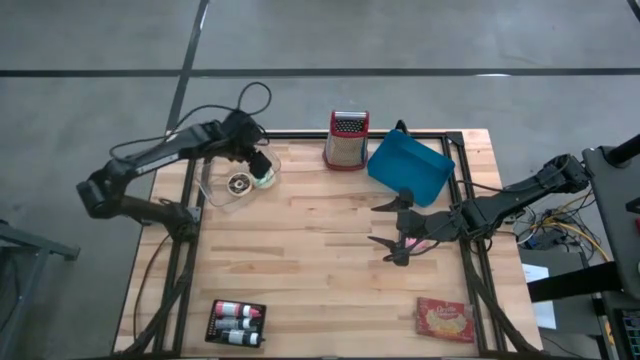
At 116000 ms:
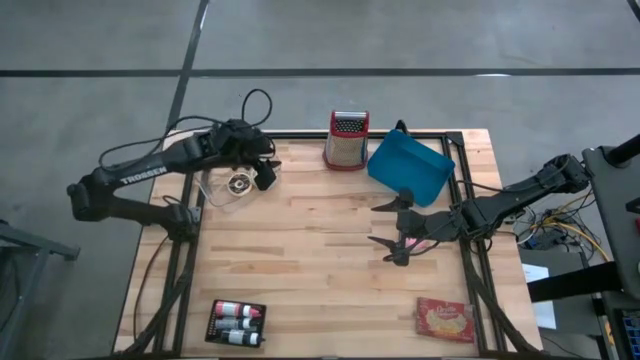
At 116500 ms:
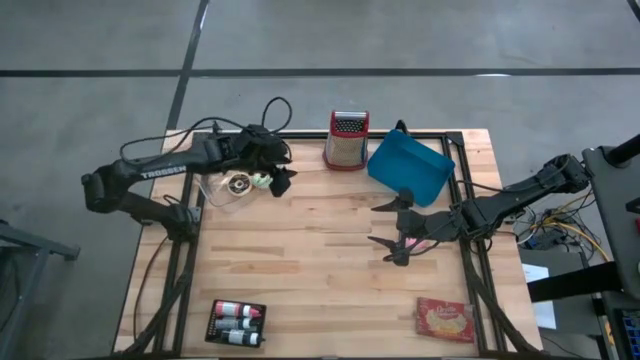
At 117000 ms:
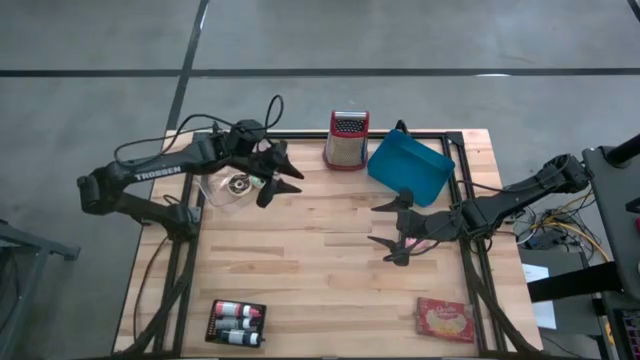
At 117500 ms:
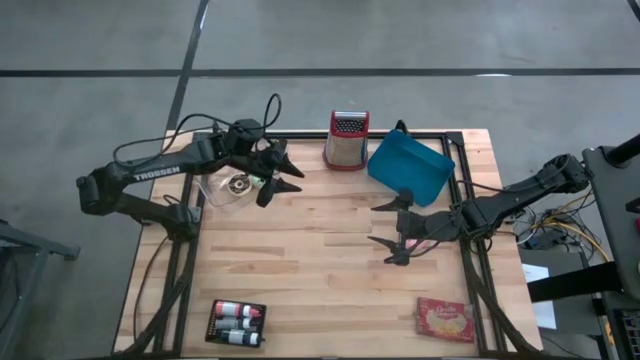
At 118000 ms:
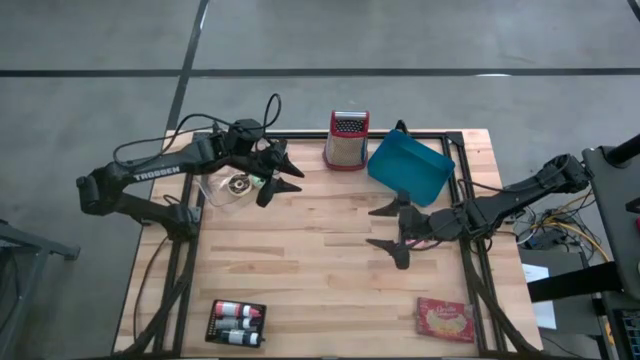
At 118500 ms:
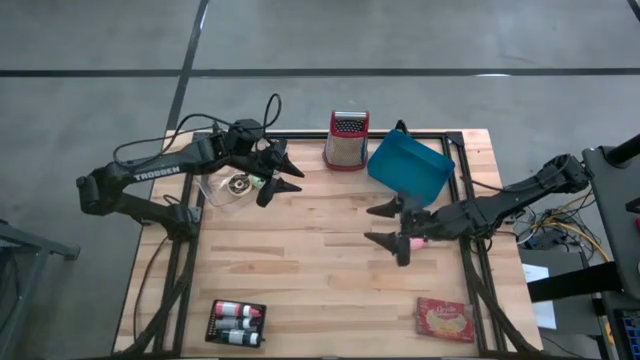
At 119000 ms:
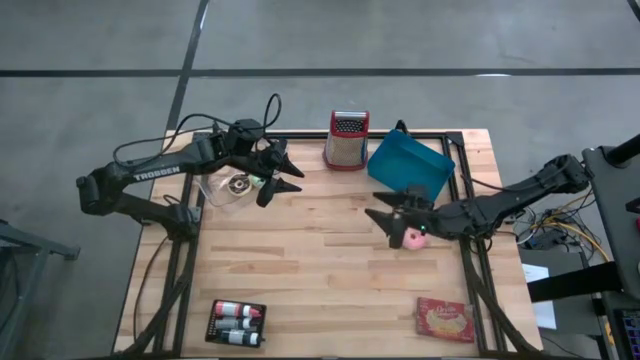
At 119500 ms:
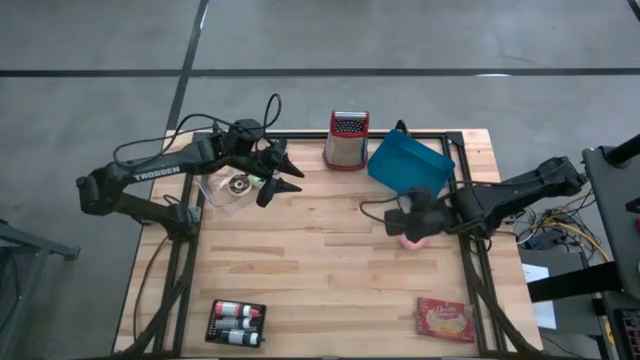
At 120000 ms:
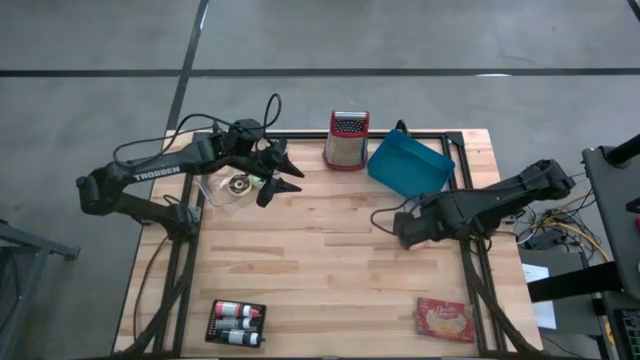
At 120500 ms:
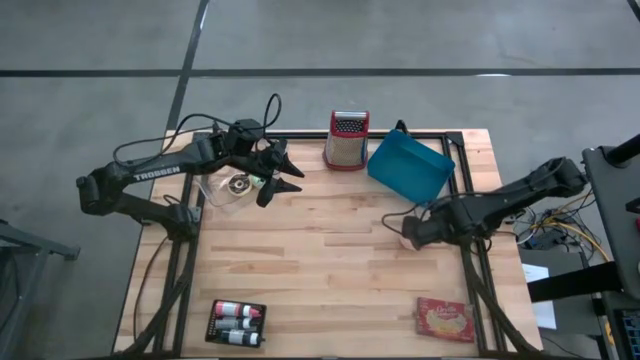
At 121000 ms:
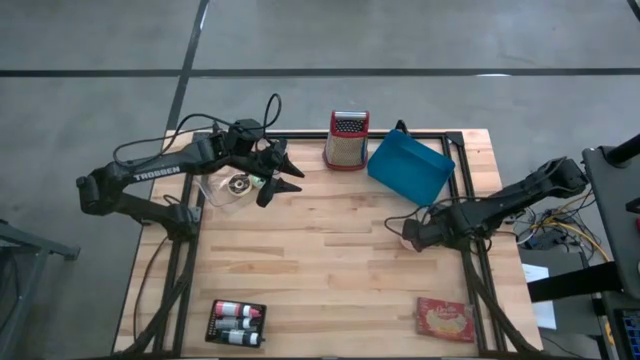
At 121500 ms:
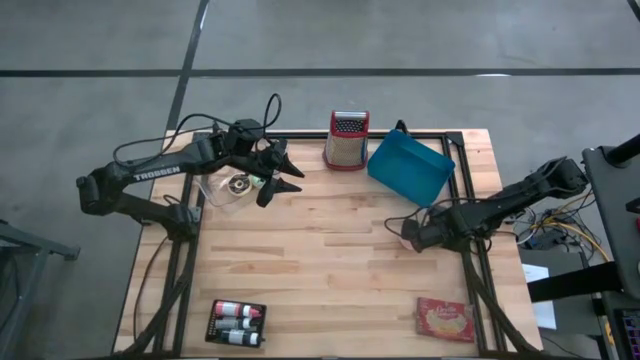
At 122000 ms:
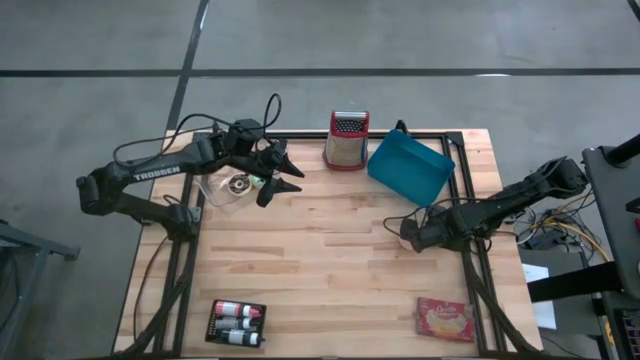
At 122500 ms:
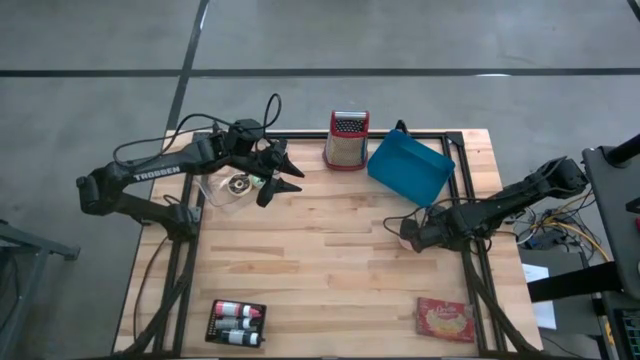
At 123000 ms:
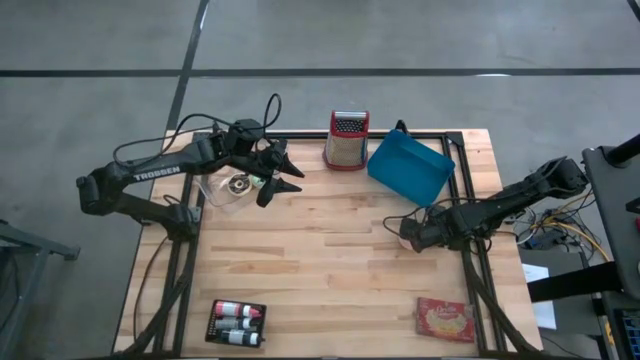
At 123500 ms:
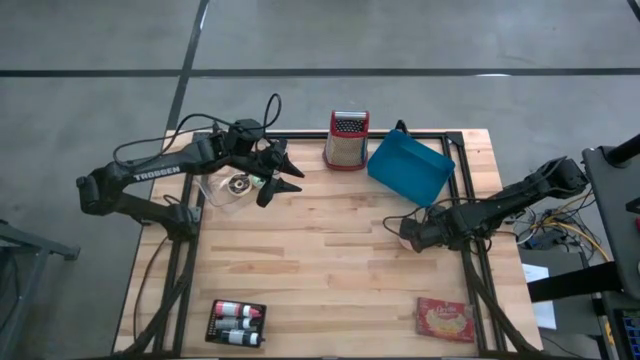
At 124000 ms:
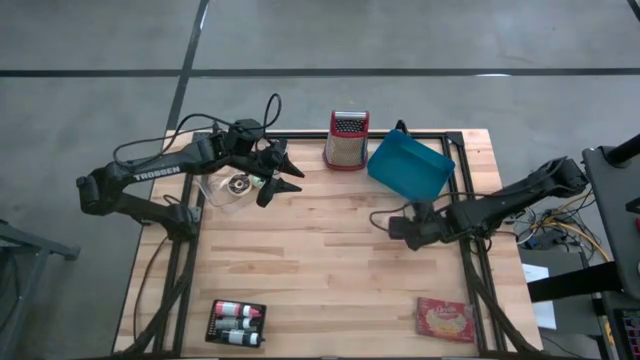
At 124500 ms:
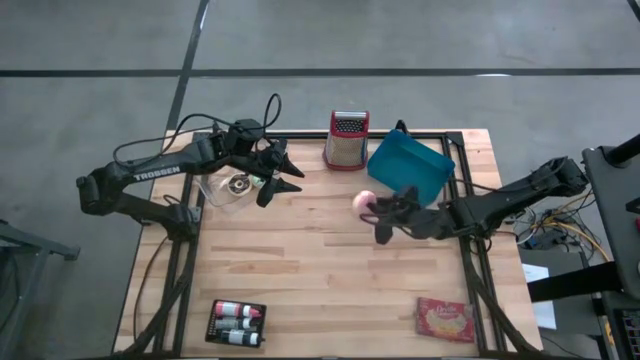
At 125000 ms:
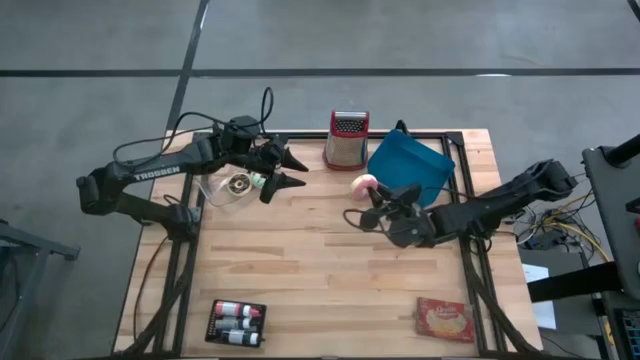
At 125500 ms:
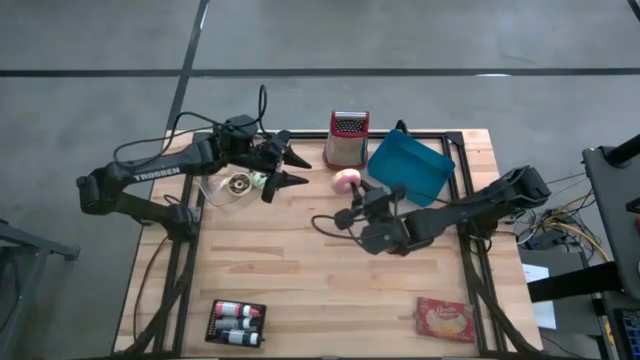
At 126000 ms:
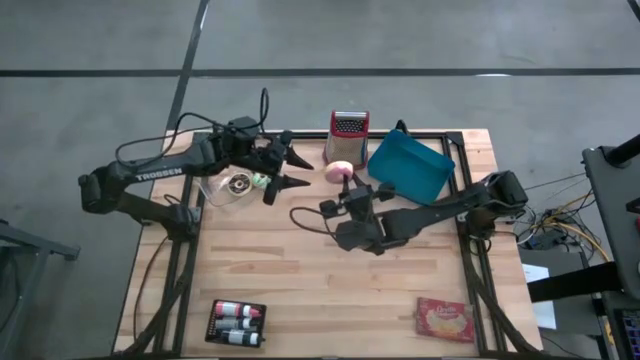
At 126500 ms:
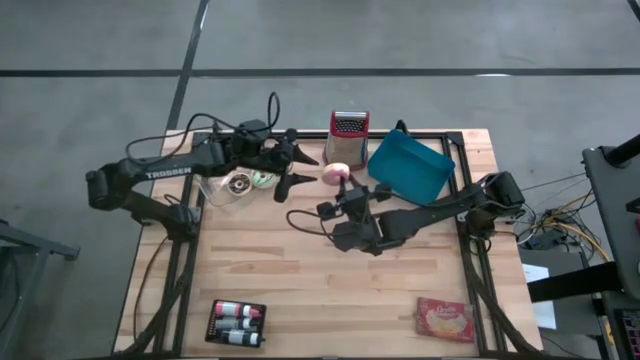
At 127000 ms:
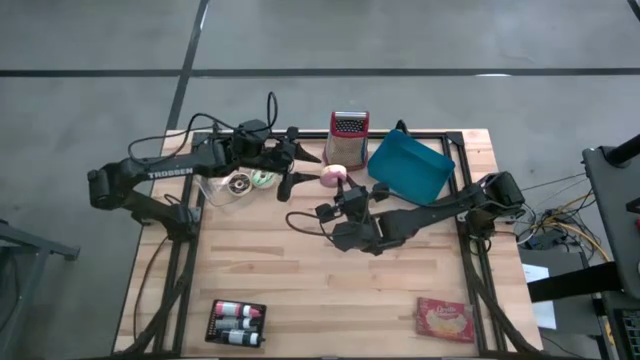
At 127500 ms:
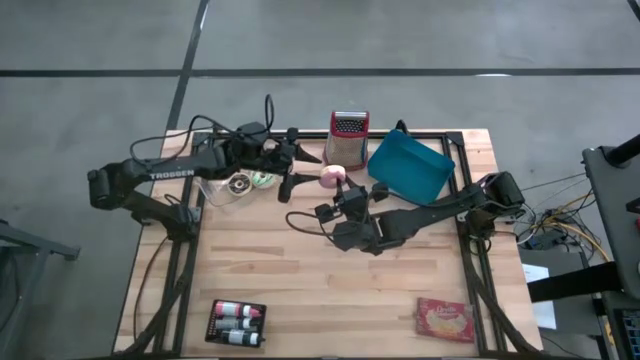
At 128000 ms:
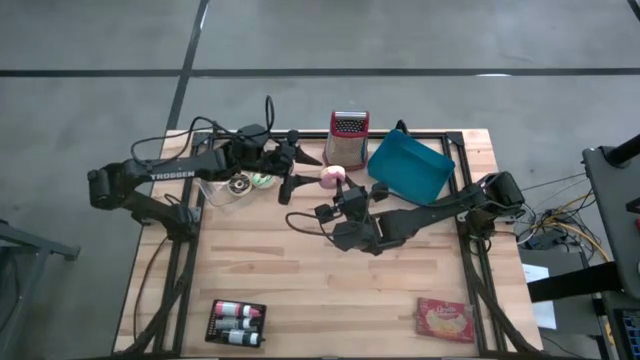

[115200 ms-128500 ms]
Task: Pick & Place Food Item
Put the pink donut into the transparent bin

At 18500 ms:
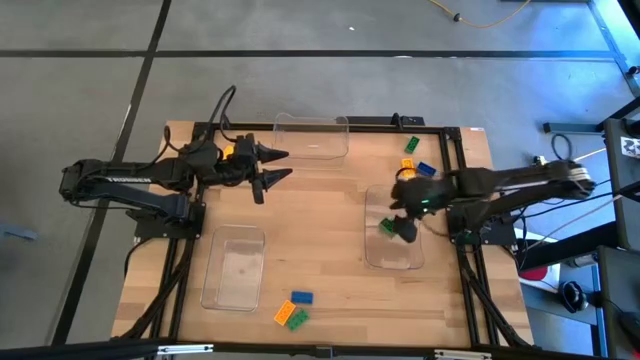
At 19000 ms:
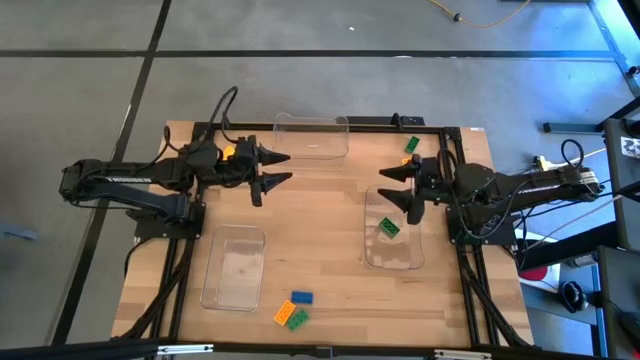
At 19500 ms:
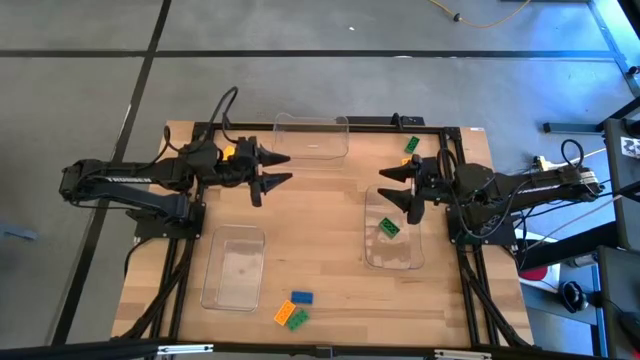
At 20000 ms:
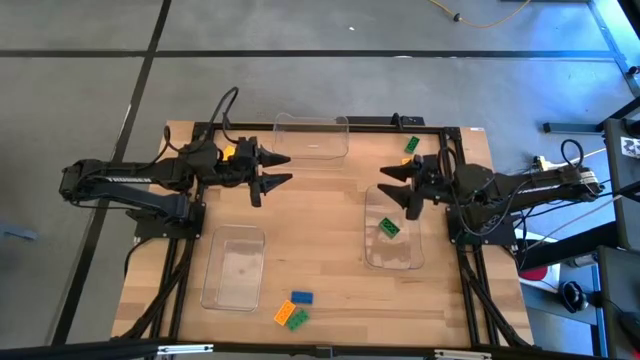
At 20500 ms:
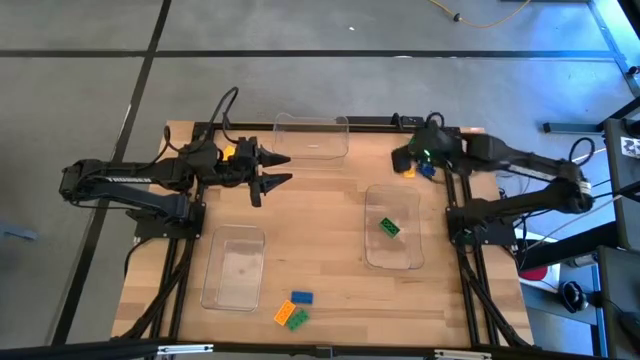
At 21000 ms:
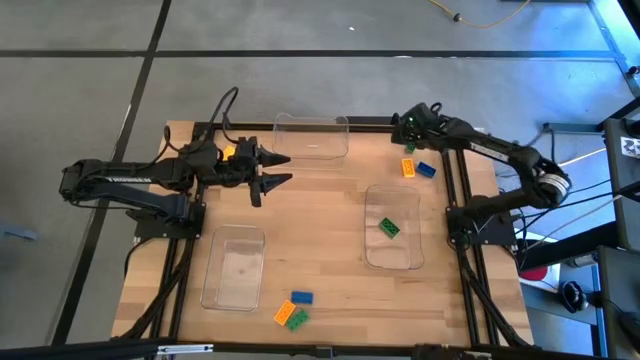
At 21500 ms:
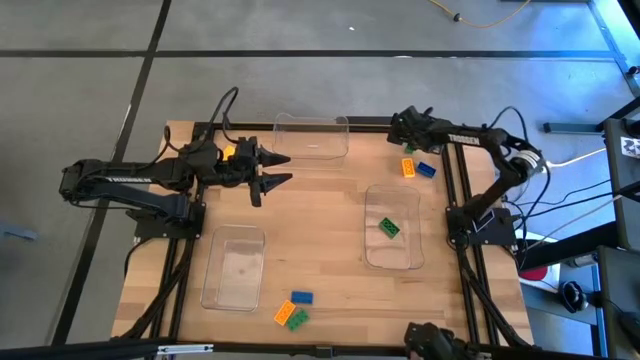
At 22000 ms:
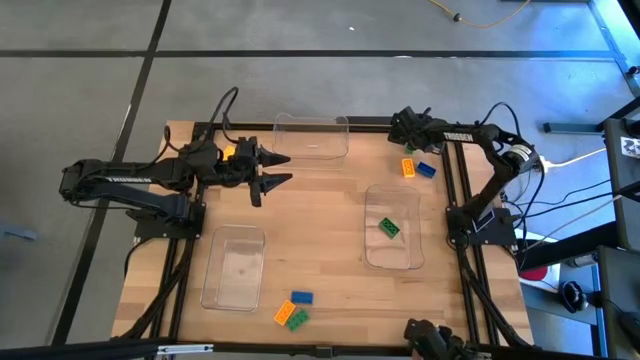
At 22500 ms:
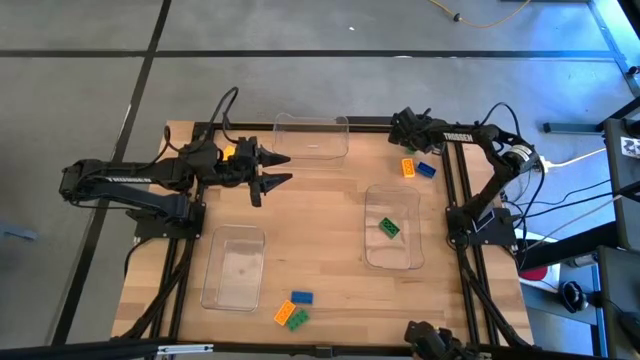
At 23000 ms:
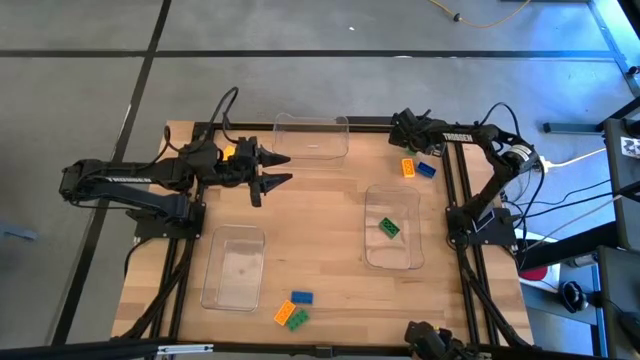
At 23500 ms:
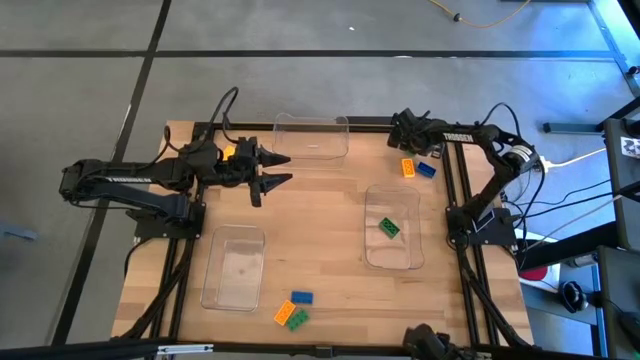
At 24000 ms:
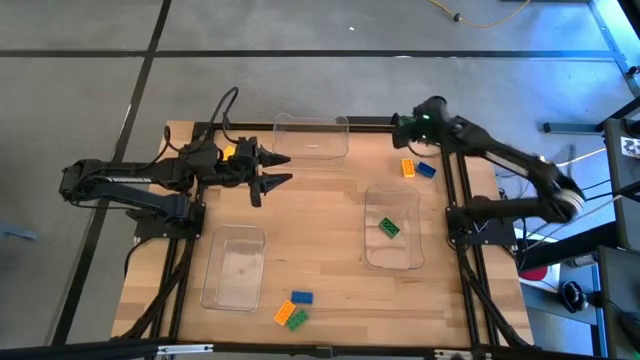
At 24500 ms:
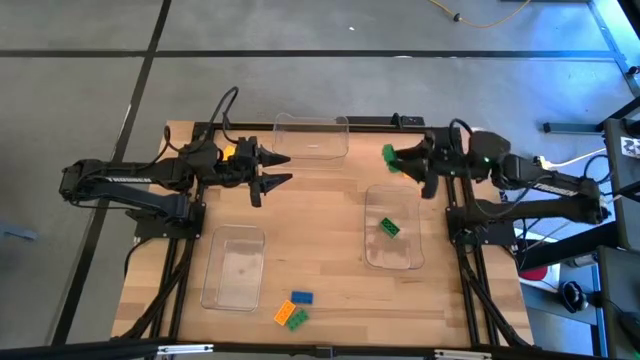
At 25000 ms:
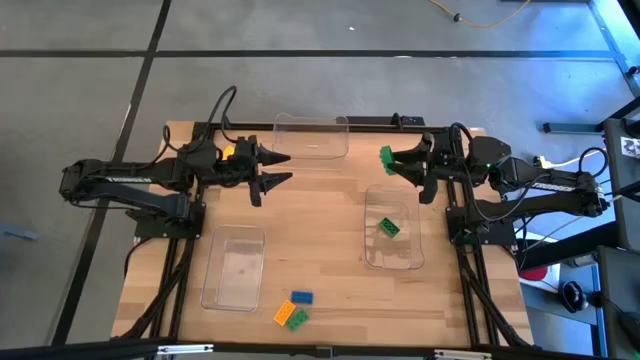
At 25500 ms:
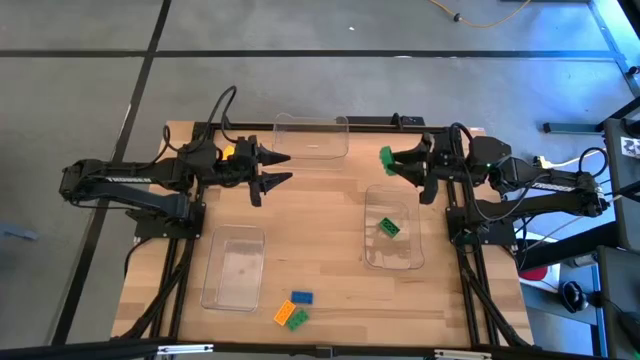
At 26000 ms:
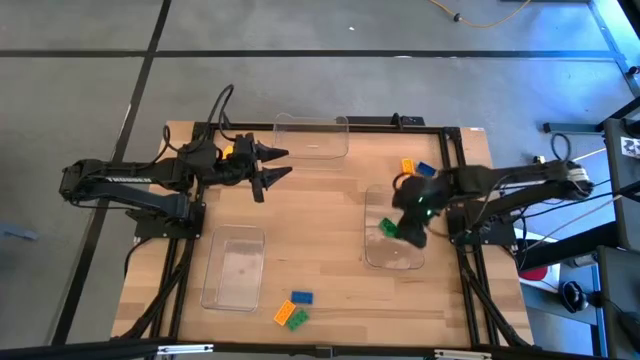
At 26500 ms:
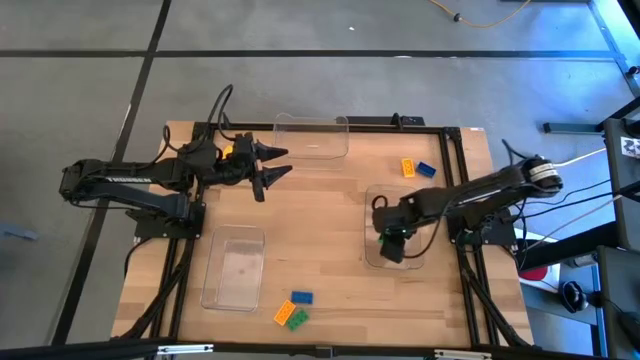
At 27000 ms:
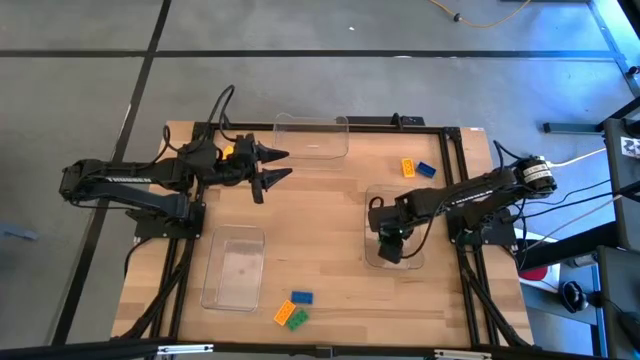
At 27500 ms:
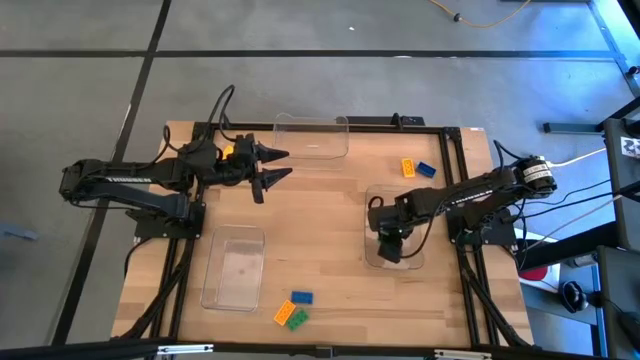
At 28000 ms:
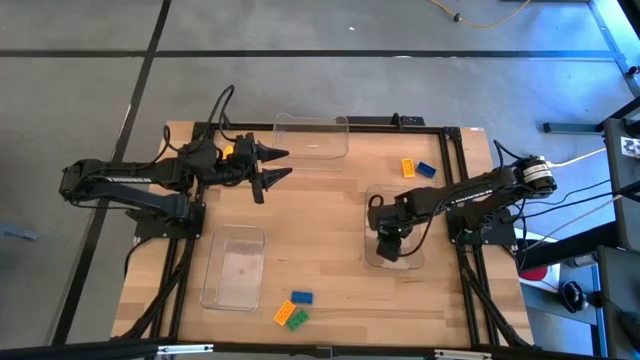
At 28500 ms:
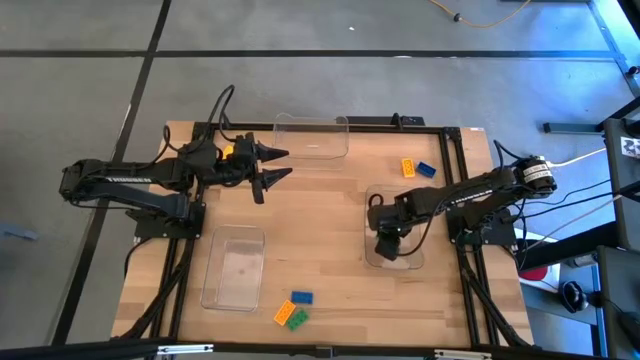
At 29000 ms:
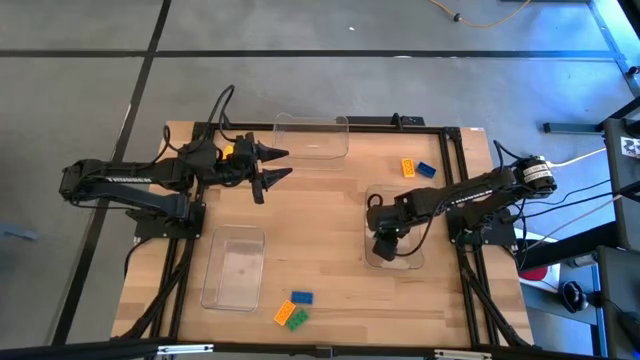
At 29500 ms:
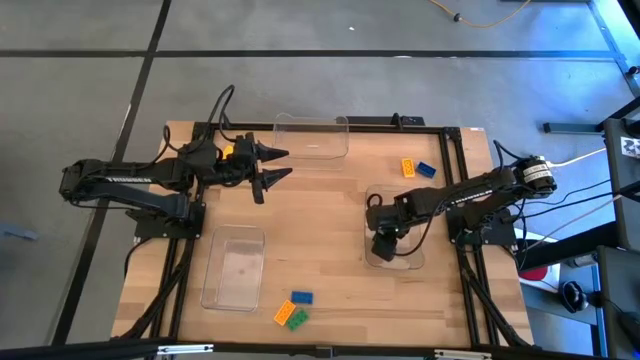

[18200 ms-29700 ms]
Task: Sort & place blocks by color
Put the top green block into the bottom right transparent bin
